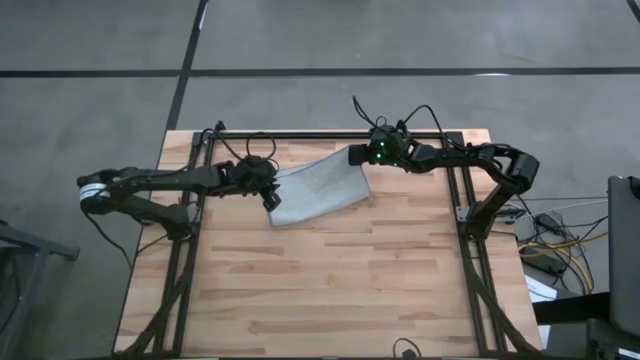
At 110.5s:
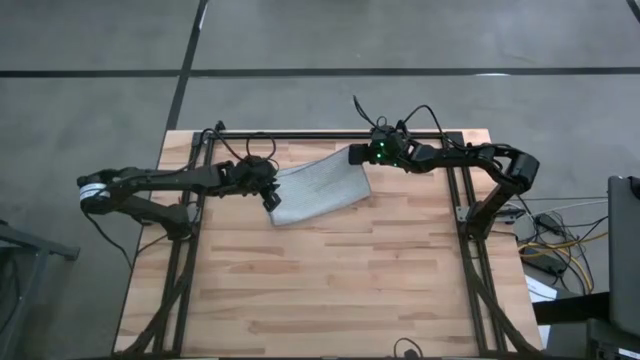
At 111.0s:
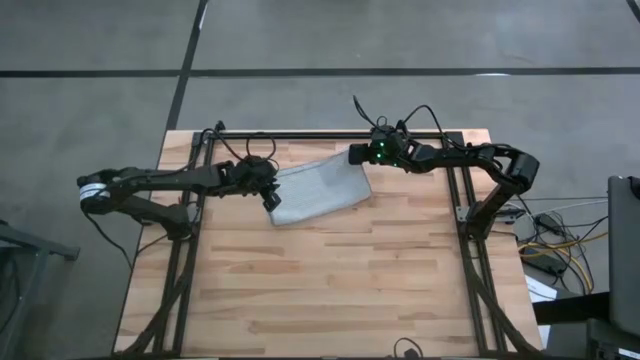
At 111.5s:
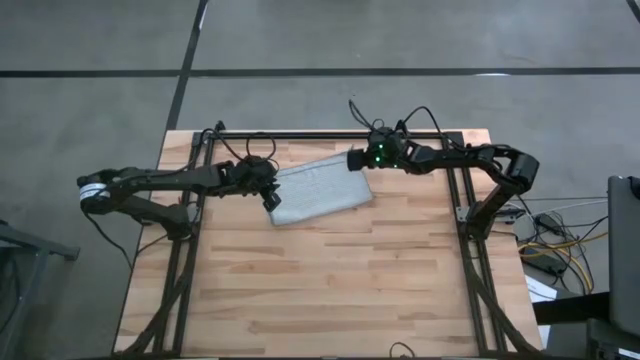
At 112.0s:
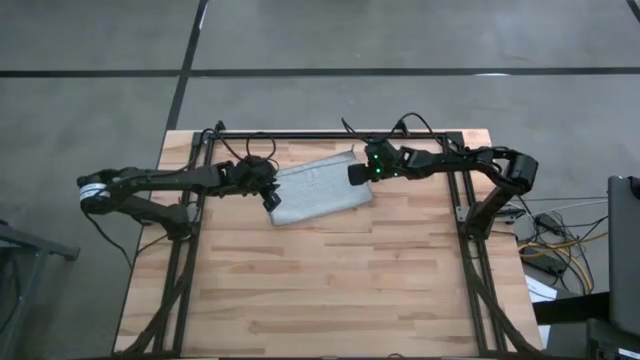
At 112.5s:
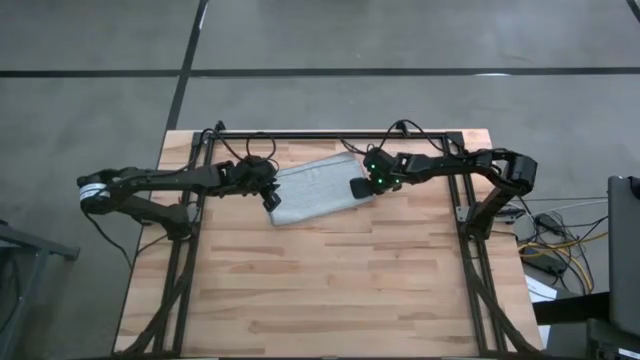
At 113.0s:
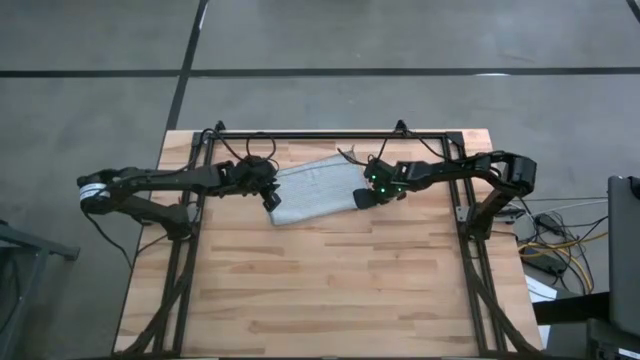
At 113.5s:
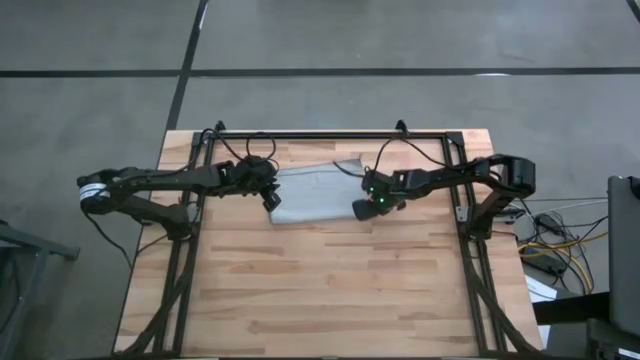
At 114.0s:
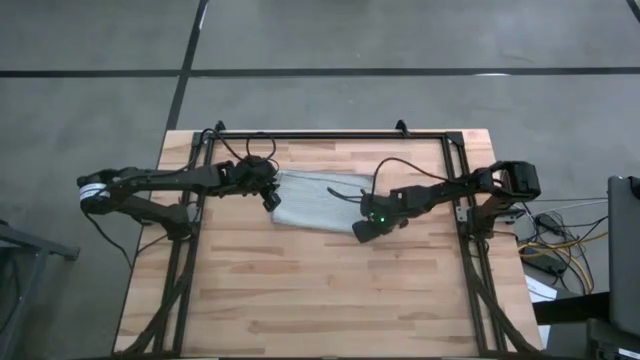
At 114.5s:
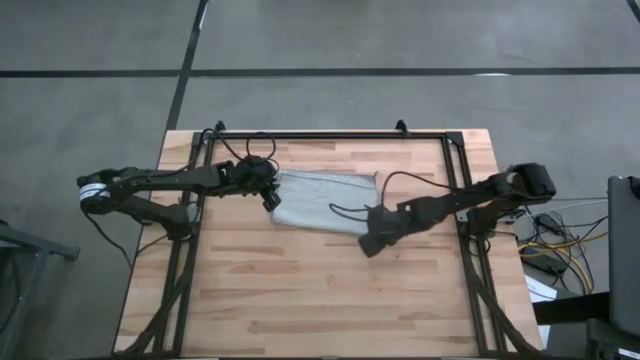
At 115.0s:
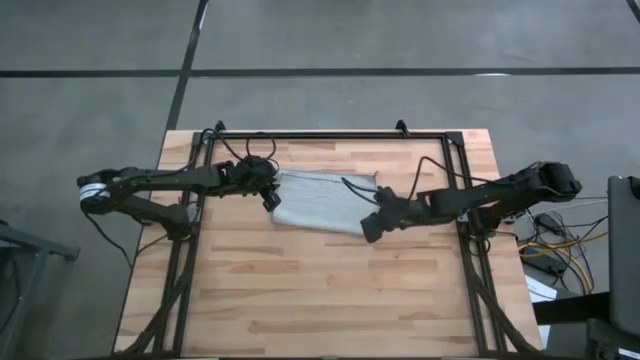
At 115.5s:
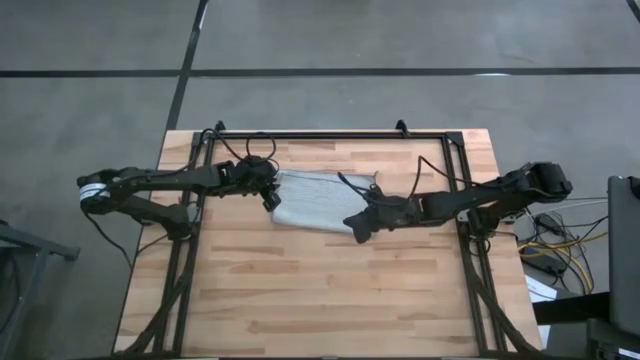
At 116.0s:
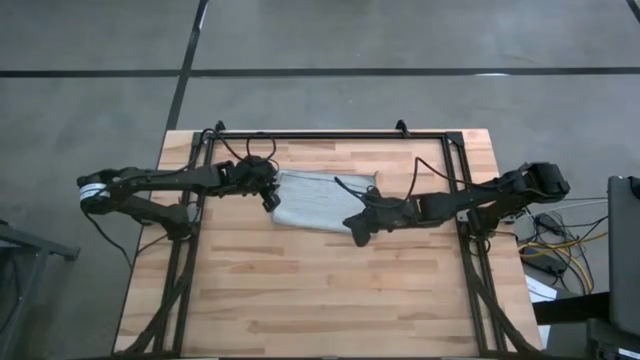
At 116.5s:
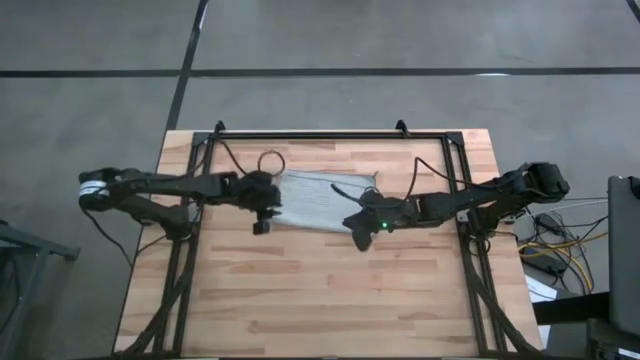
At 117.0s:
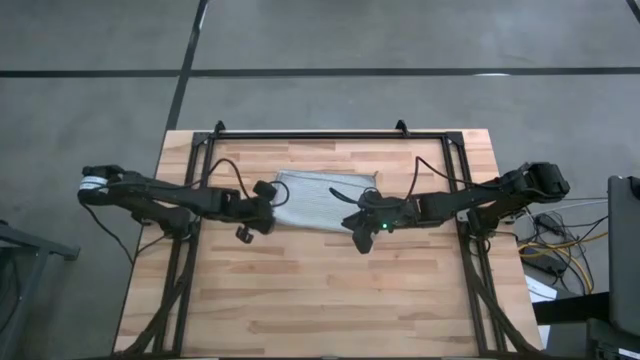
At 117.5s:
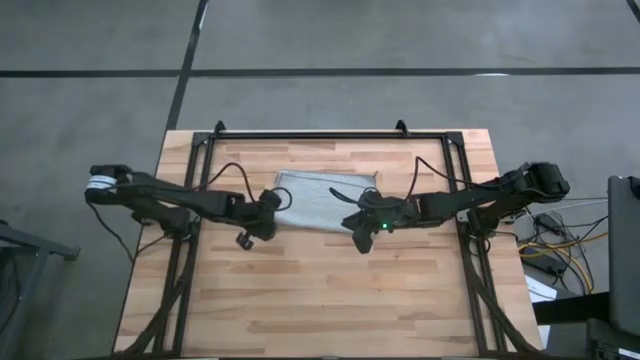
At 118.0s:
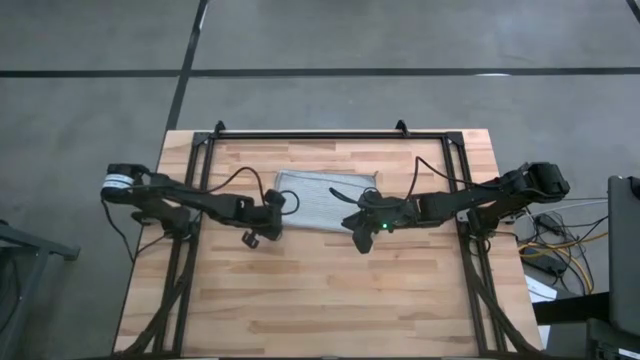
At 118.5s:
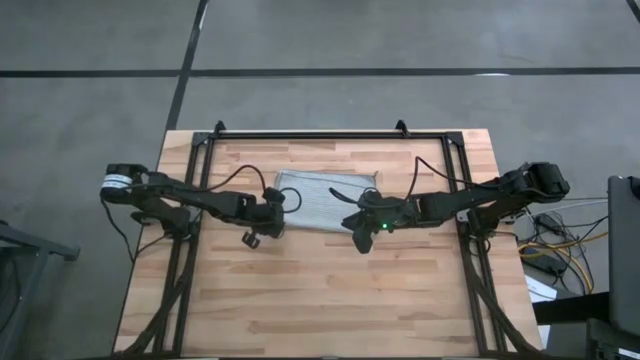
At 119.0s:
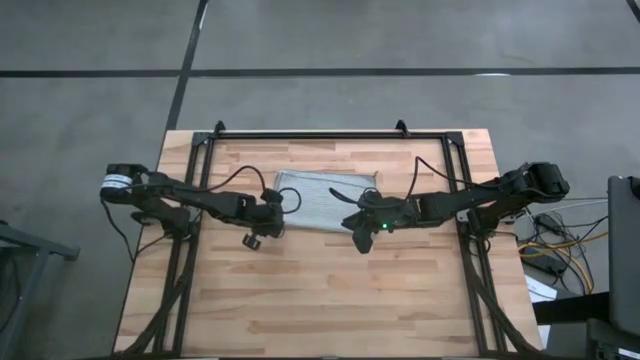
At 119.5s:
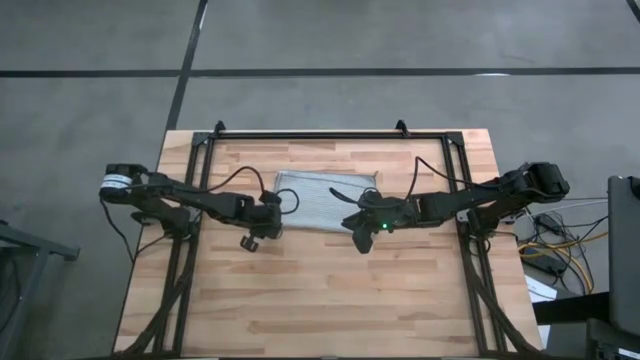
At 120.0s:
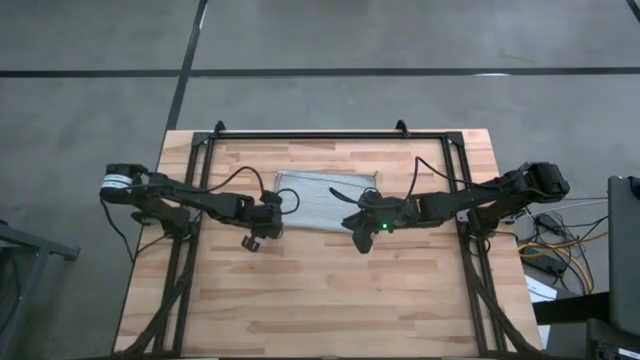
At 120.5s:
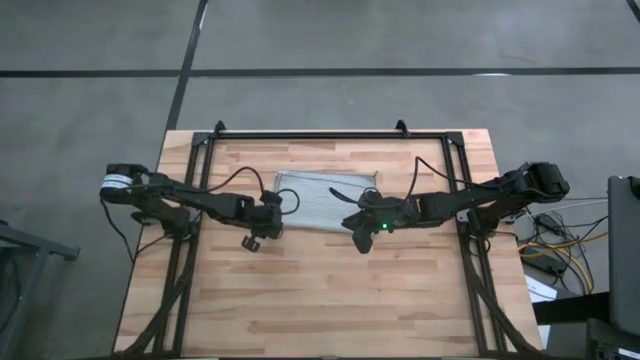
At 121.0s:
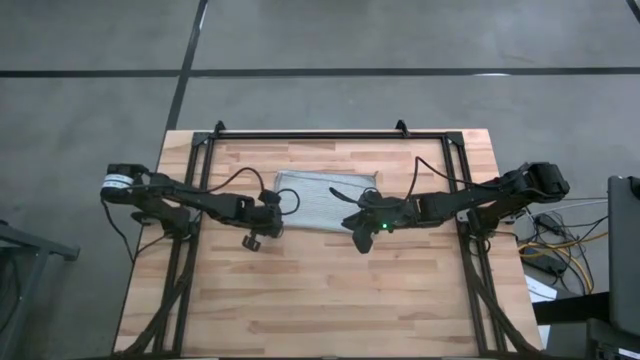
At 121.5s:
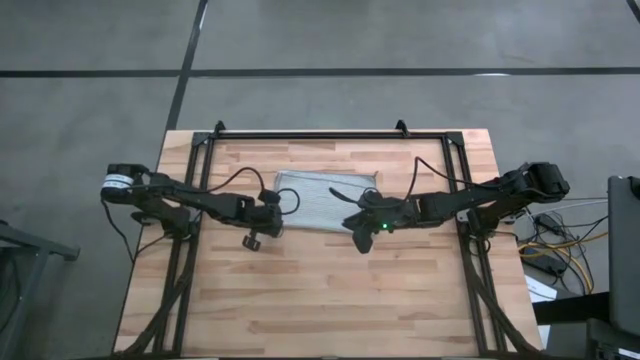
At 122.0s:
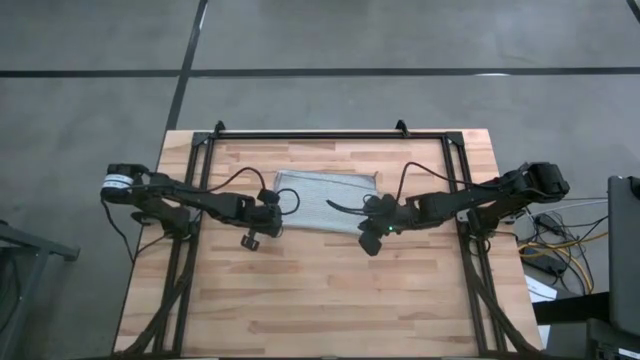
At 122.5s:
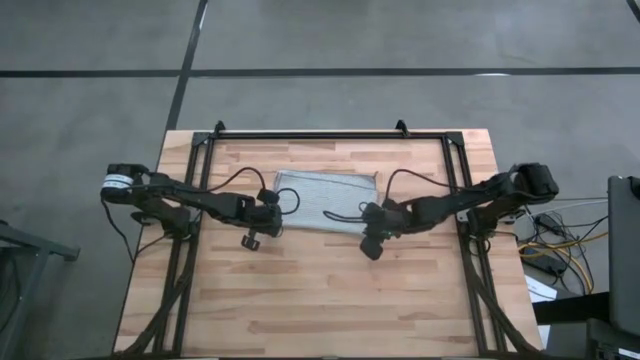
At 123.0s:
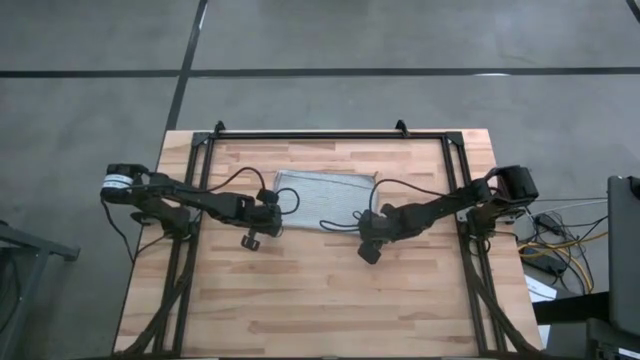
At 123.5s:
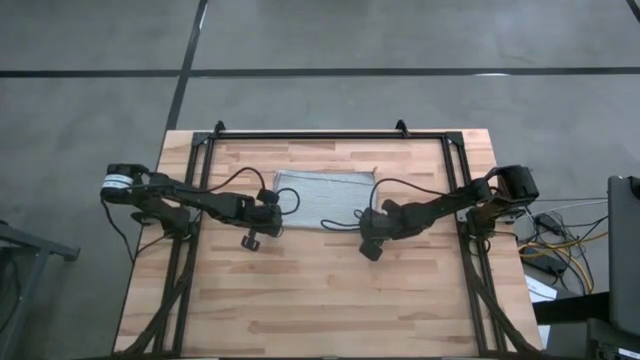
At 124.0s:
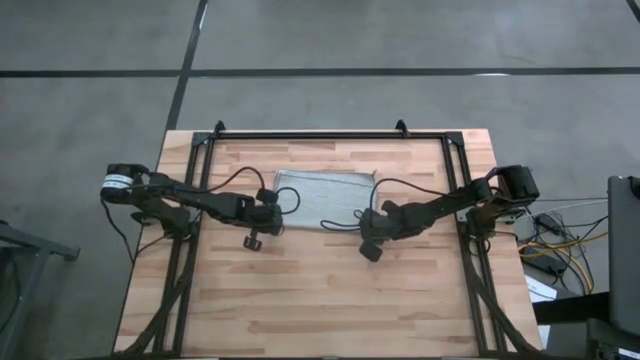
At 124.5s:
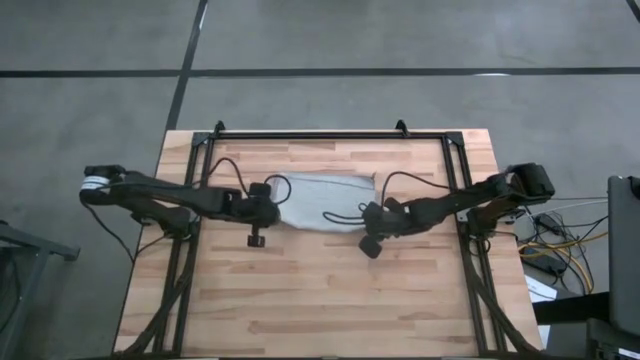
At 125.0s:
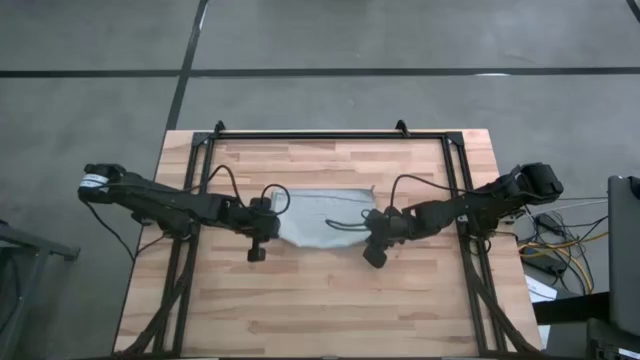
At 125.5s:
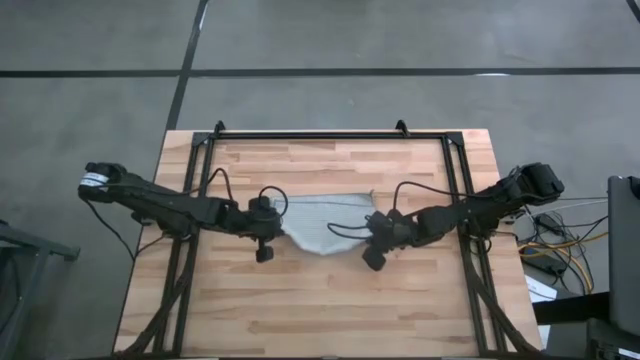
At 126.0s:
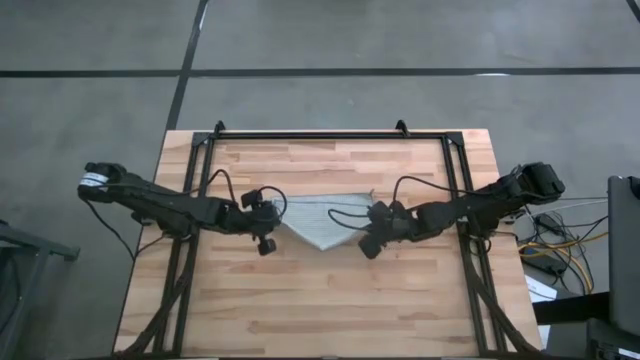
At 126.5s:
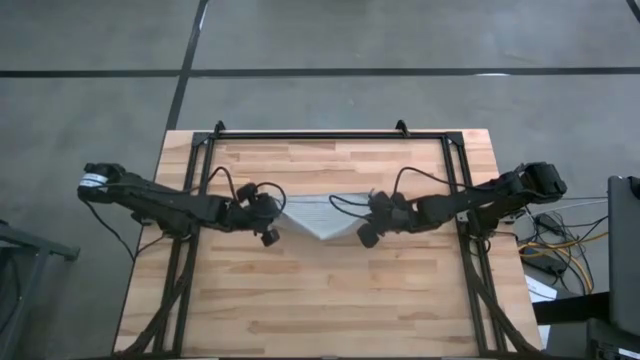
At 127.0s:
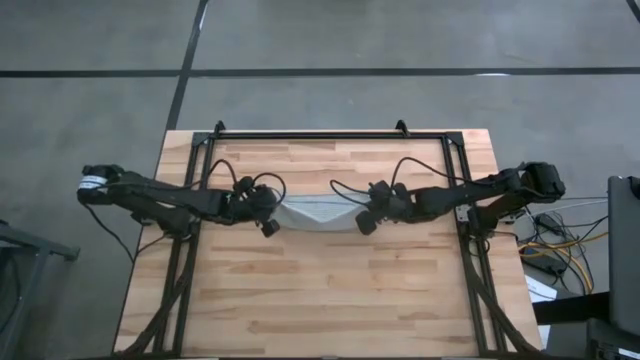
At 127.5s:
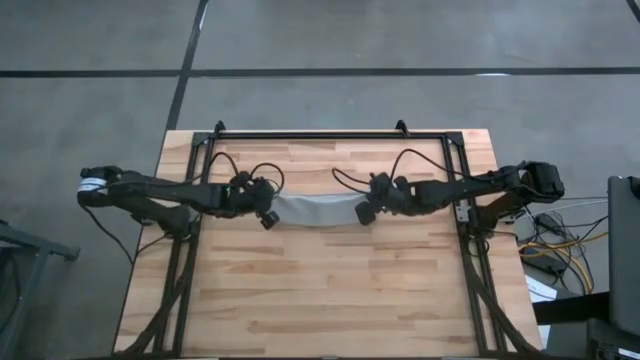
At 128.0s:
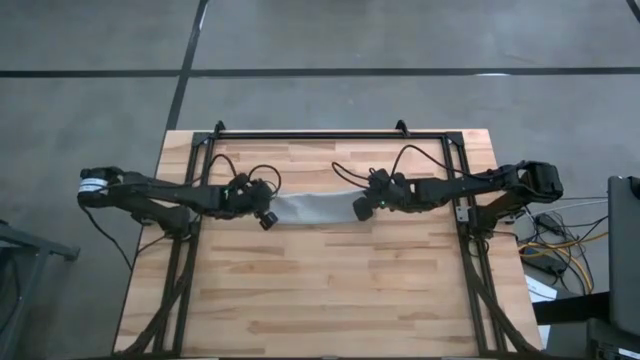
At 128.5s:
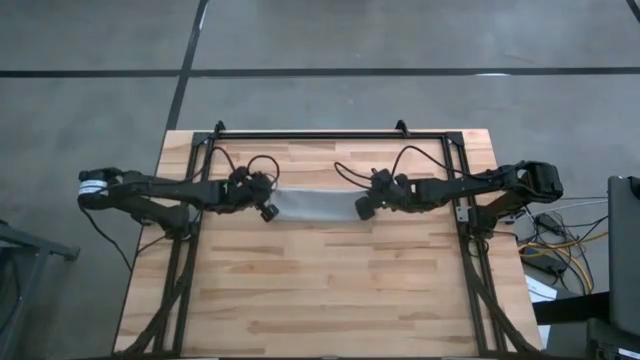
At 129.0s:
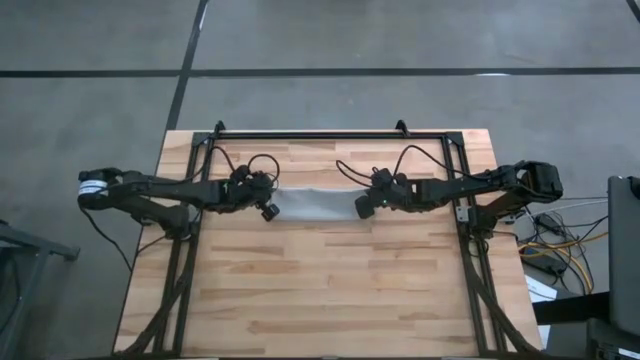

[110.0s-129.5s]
Task: Roll towel
Fold the gray towel

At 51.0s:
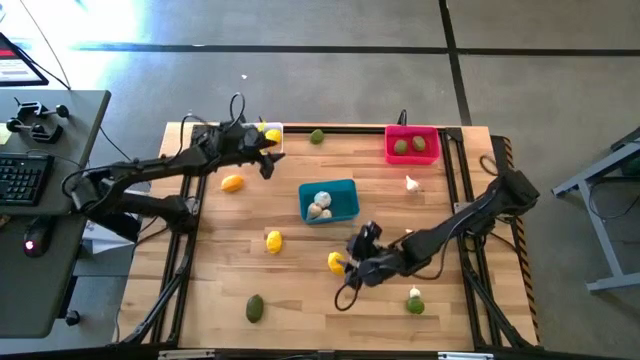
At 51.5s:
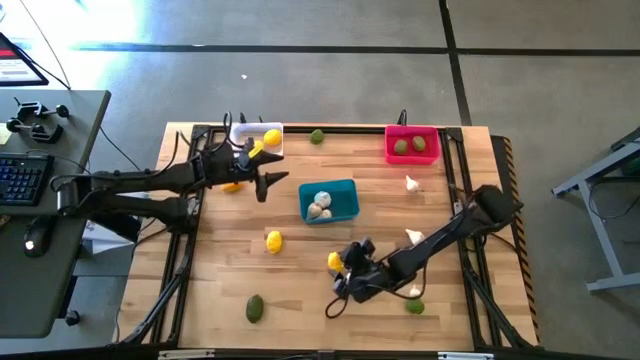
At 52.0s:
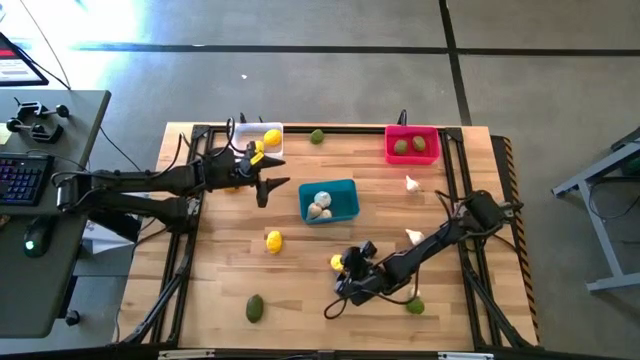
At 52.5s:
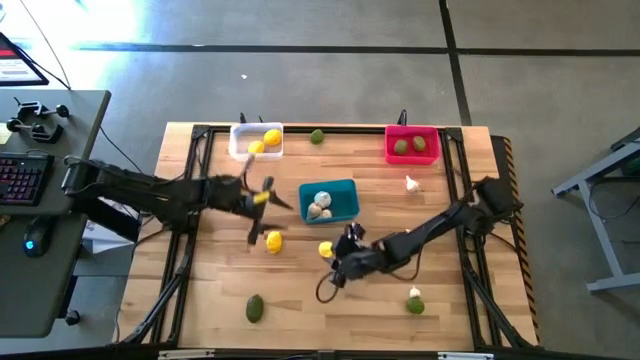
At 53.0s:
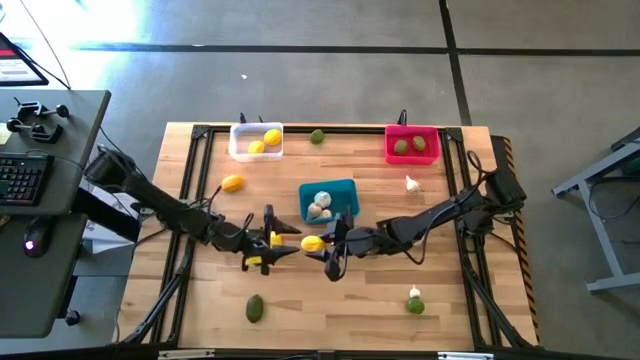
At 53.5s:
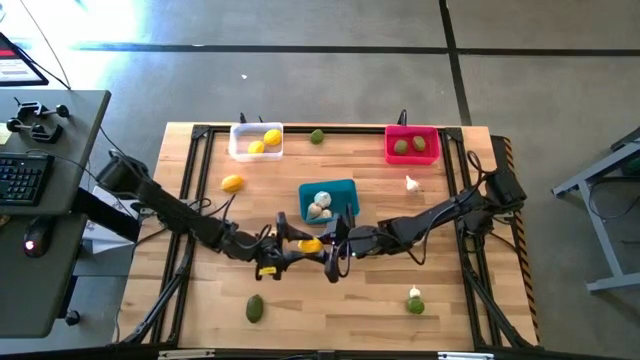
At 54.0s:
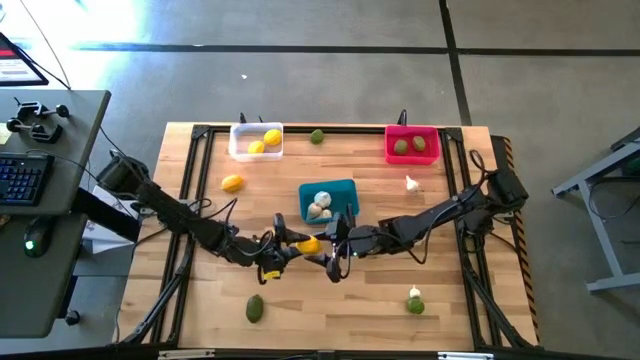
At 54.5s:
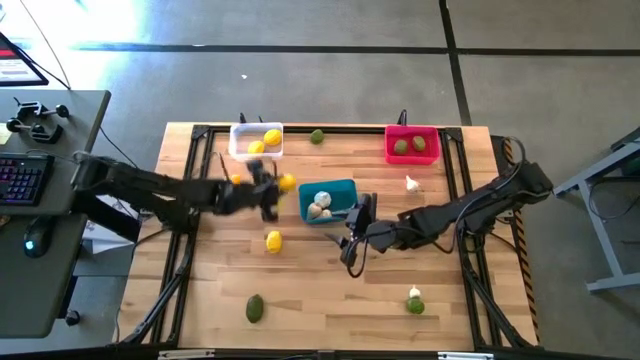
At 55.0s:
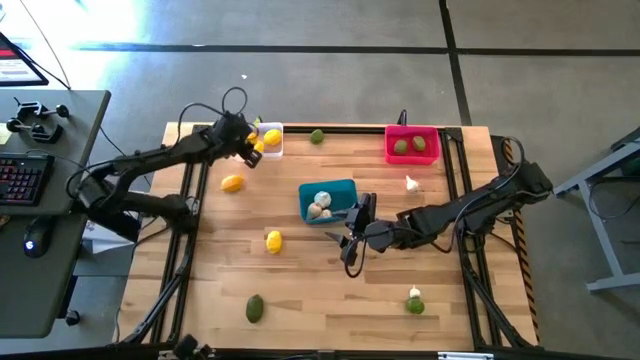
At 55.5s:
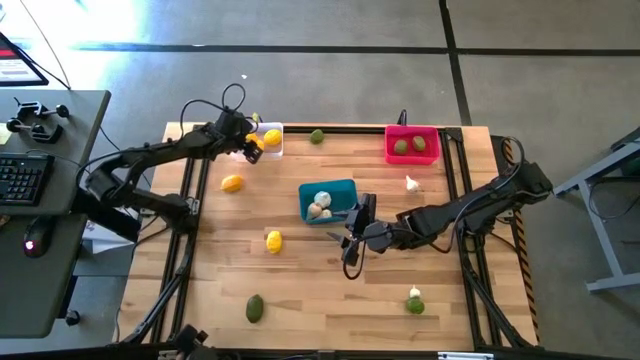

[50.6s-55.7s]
Task: Sort produce into baskets
Put the lemon into the transparent bin
